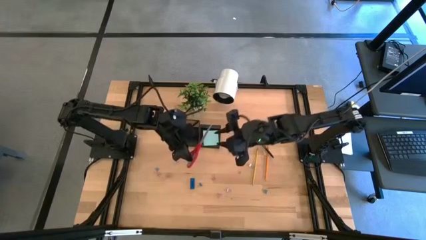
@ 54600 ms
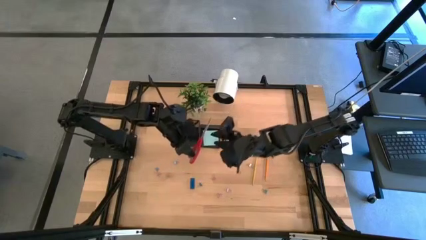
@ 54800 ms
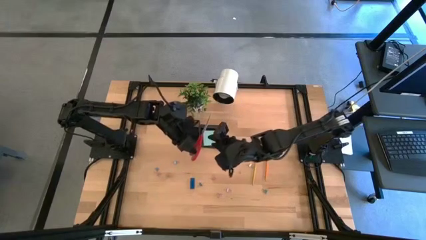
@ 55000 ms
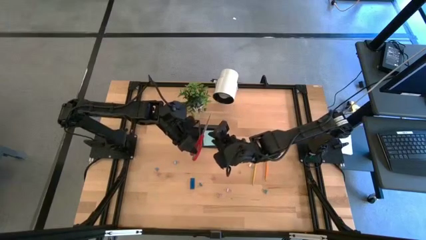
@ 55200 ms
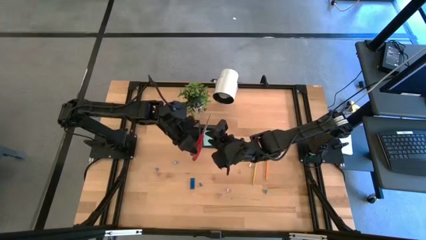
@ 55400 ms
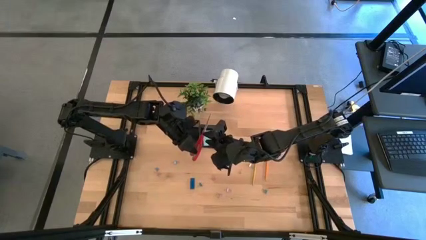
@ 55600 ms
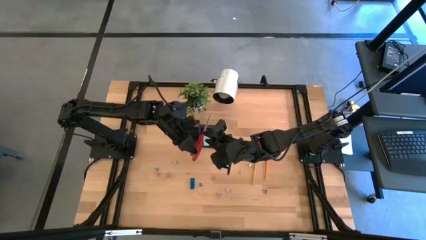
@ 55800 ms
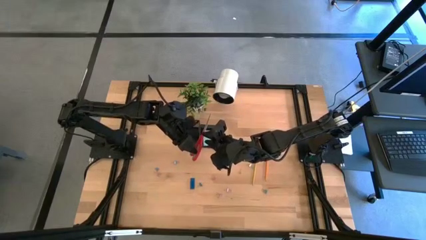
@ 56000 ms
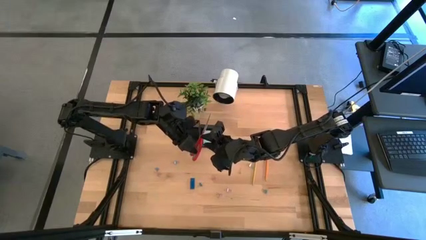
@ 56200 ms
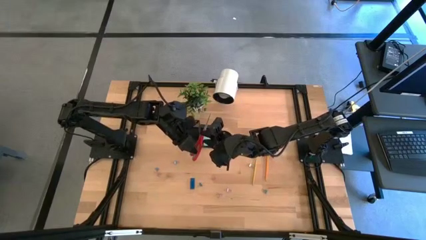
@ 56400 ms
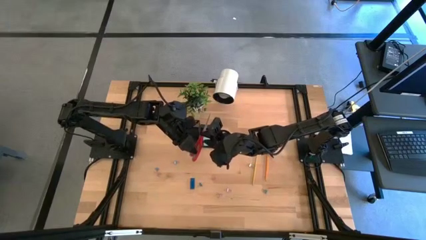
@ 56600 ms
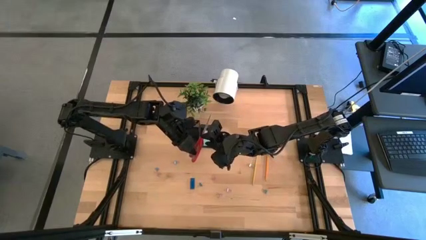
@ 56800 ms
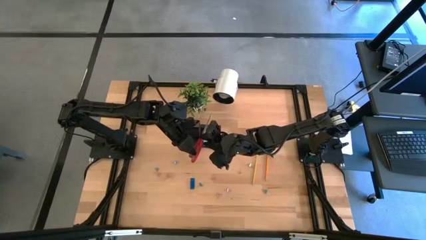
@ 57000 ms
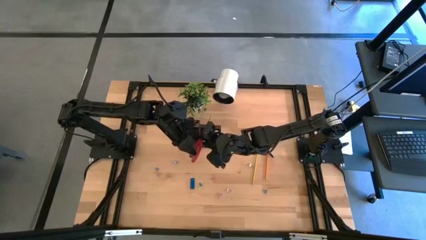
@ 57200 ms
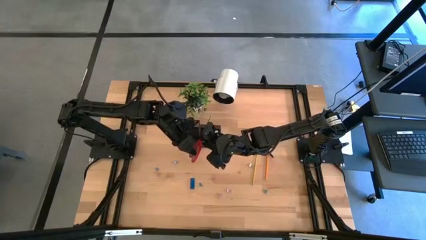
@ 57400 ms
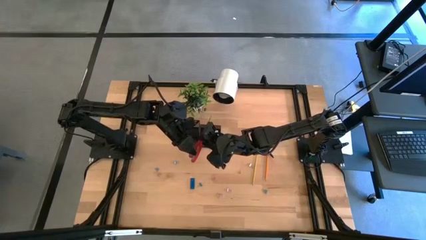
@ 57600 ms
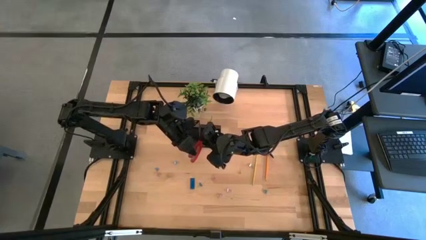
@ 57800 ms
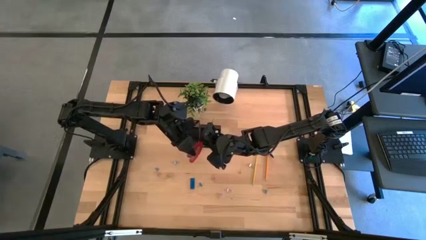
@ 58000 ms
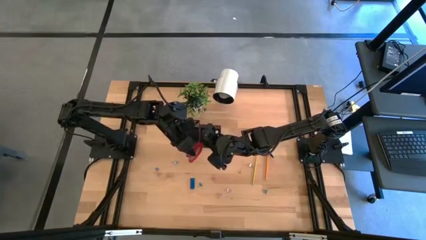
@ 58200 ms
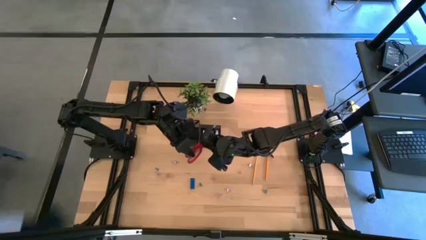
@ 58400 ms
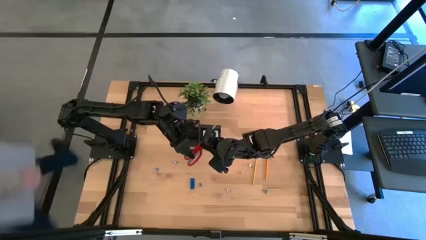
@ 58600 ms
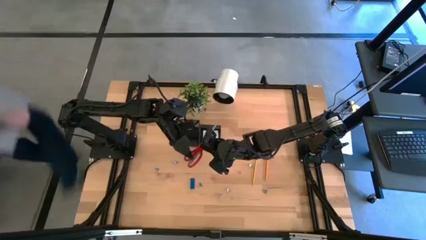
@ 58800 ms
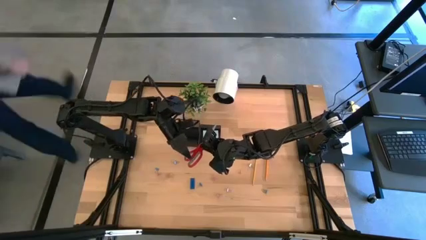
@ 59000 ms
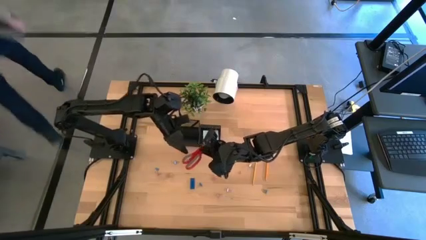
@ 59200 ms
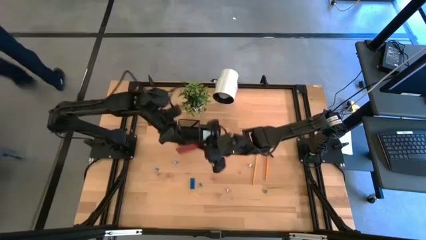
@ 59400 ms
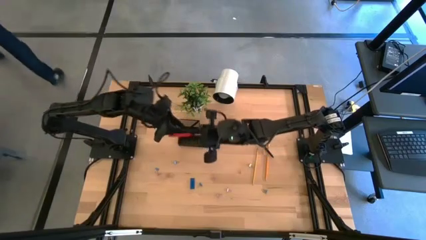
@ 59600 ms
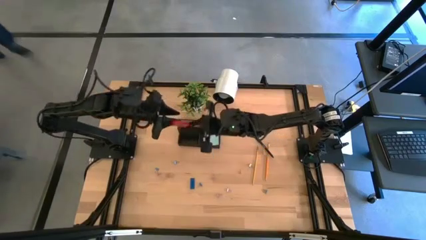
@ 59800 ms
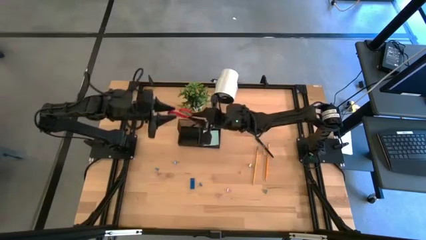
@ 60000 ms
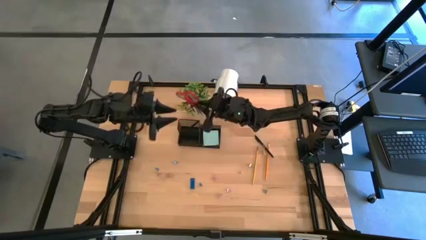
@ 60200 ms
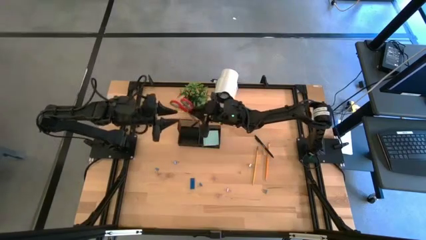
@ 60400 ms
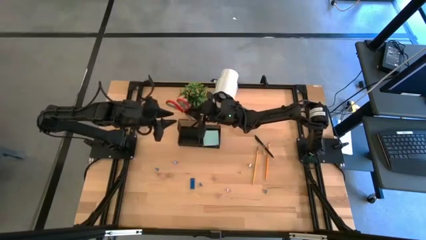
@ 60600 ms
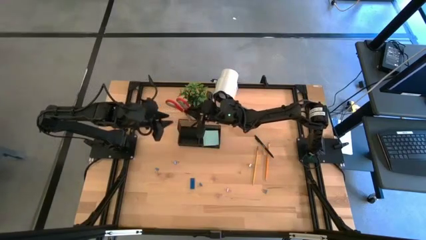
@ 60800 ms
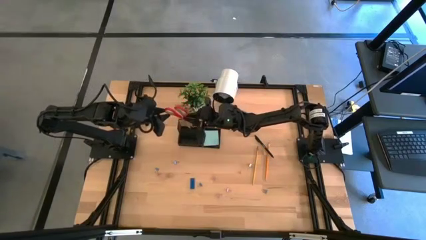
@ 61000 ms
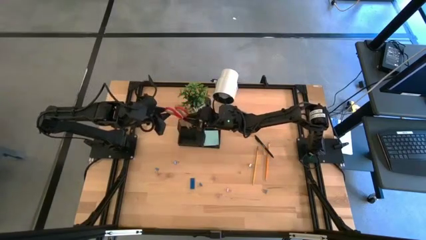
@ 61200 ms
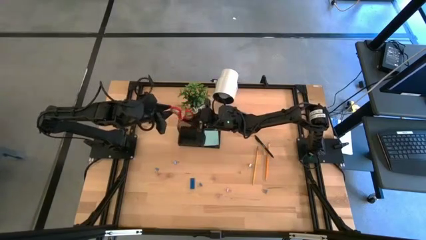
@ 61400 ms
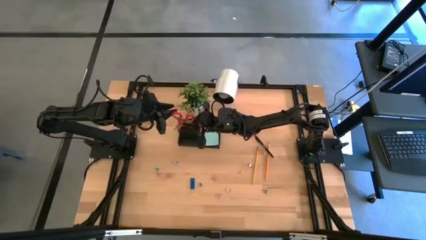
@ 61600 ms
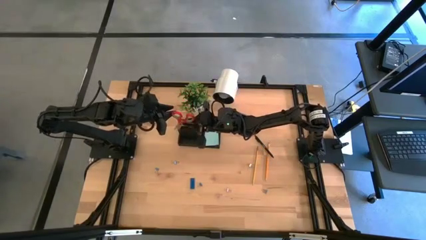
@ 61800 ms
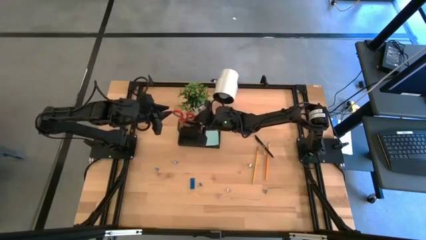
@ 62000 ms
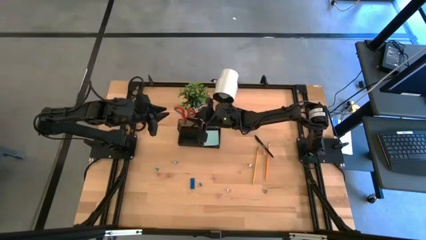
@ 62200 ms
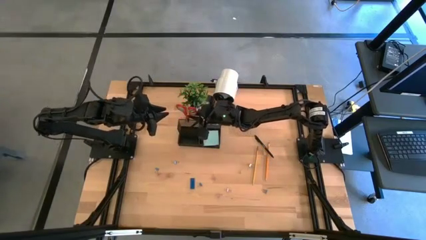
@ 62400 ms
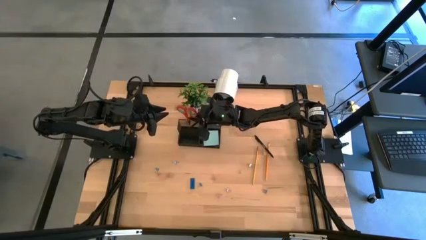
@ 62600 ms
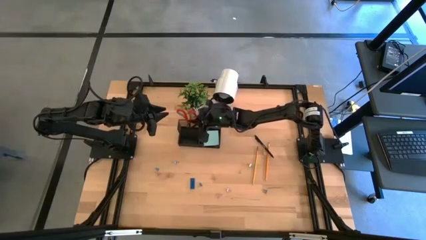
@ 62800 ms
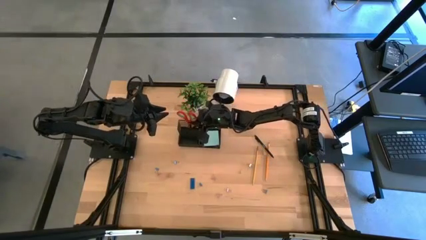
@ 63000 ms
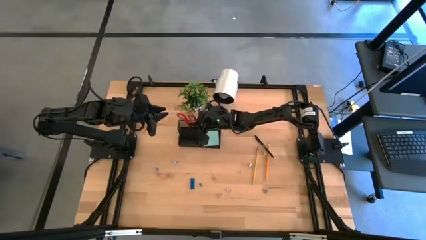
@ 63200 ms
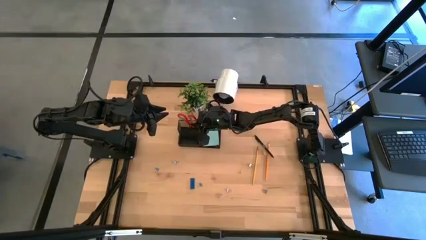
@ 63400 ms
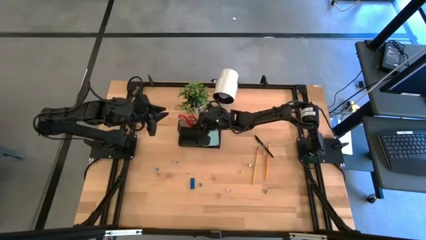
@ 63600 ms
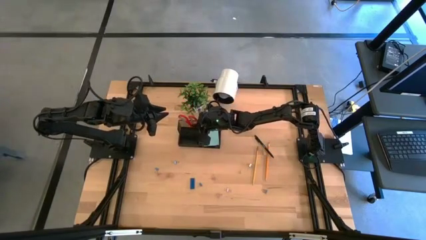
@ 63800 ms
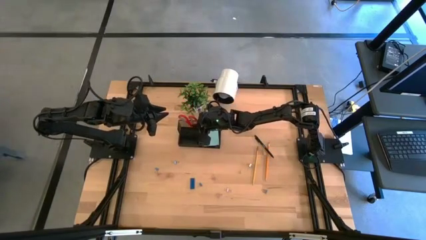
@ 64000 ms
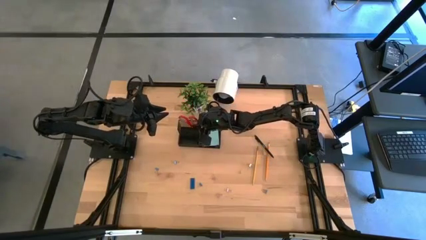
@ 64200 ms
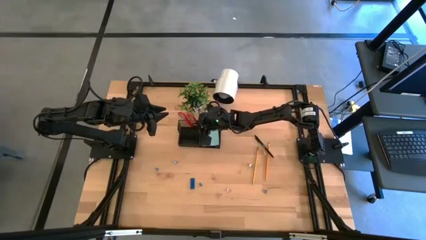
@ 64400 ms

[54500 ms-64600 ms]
Task: Pick and place office supplies into organizer
Put the red scissors into the black desk organizer

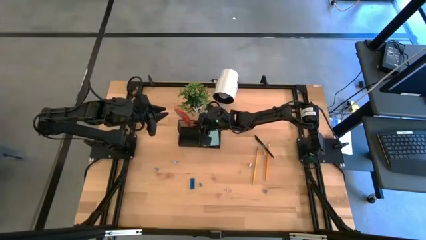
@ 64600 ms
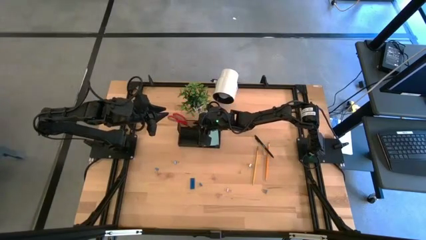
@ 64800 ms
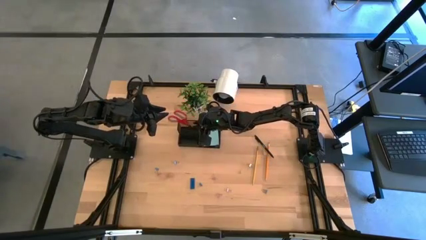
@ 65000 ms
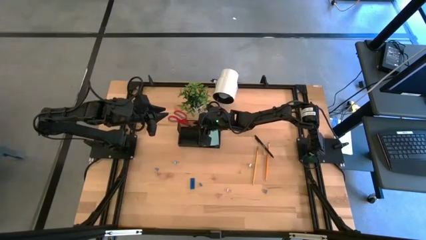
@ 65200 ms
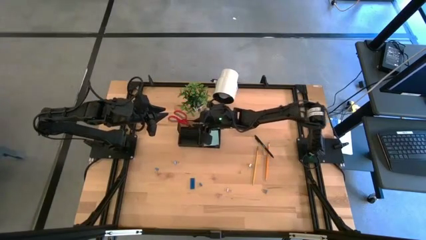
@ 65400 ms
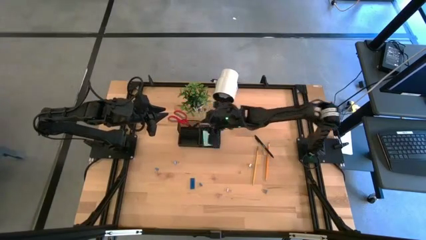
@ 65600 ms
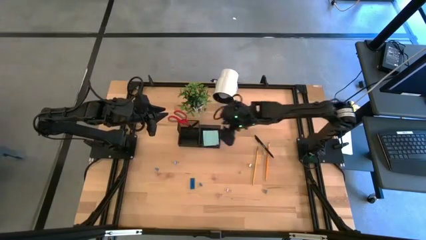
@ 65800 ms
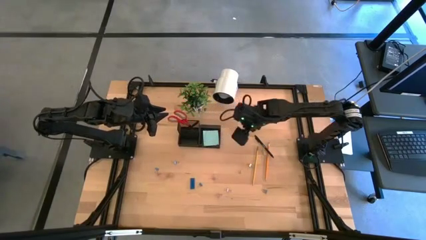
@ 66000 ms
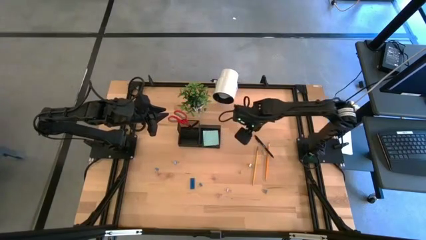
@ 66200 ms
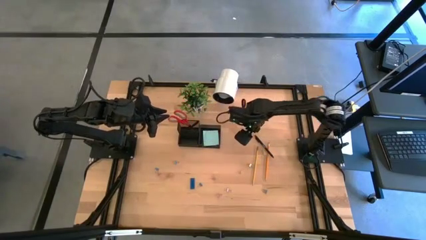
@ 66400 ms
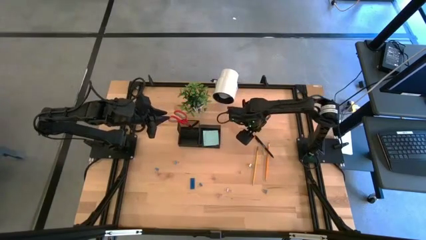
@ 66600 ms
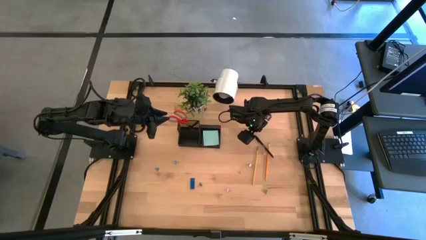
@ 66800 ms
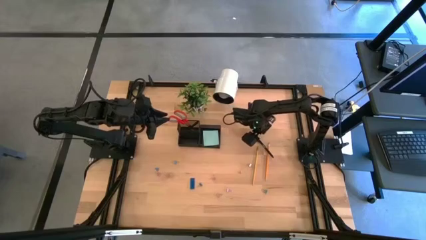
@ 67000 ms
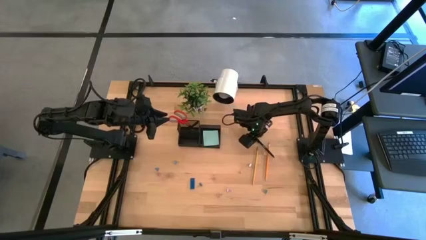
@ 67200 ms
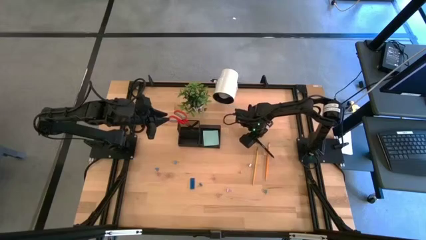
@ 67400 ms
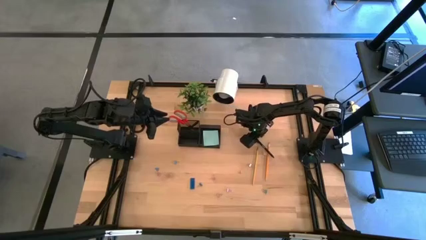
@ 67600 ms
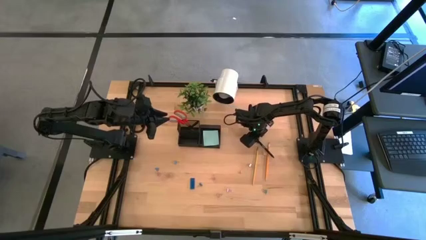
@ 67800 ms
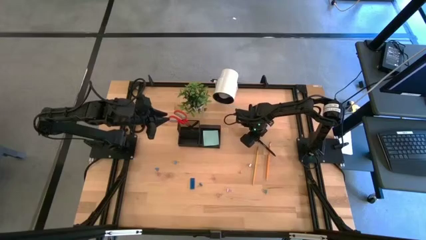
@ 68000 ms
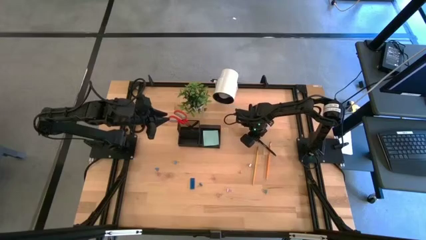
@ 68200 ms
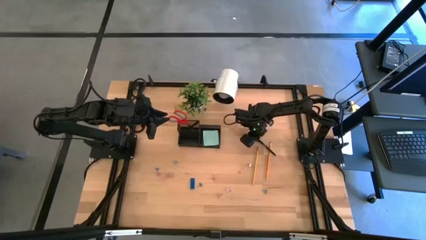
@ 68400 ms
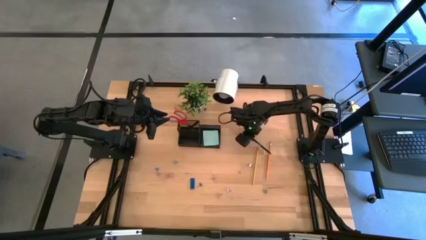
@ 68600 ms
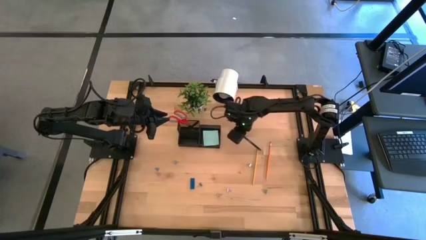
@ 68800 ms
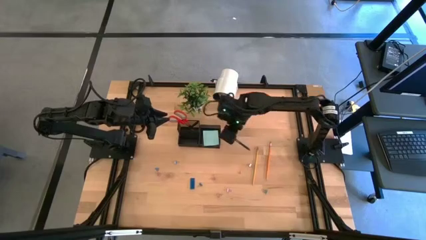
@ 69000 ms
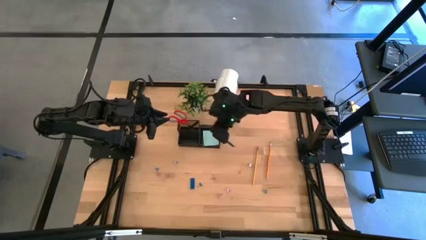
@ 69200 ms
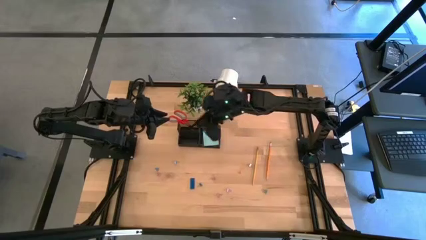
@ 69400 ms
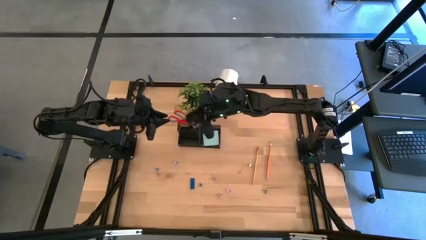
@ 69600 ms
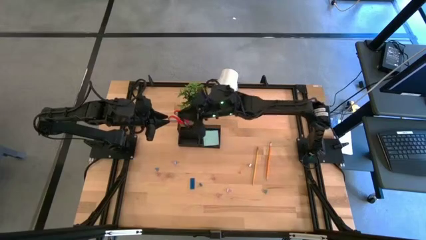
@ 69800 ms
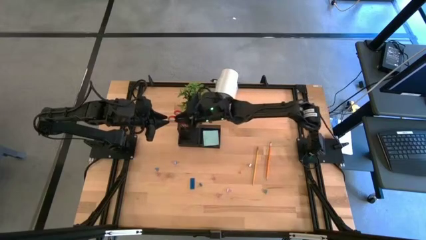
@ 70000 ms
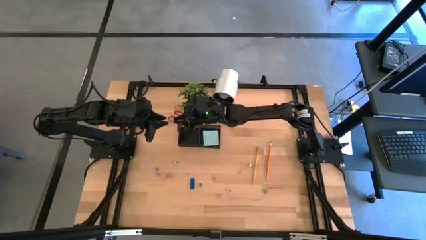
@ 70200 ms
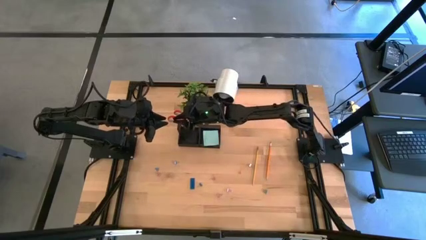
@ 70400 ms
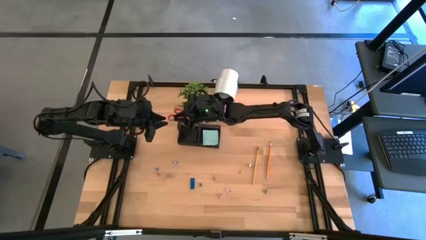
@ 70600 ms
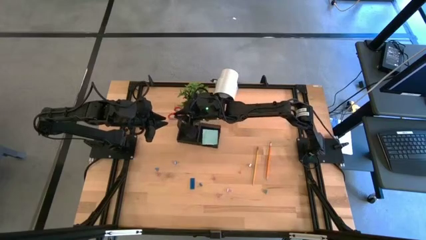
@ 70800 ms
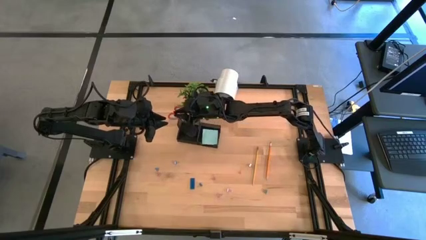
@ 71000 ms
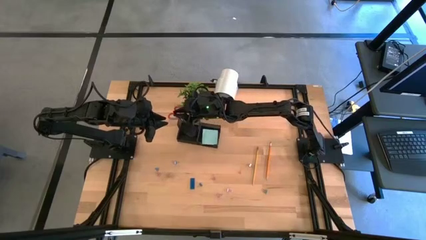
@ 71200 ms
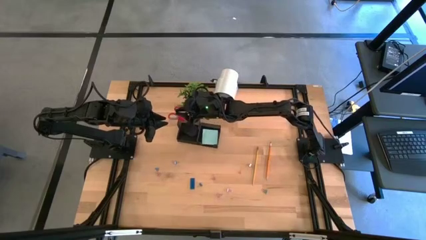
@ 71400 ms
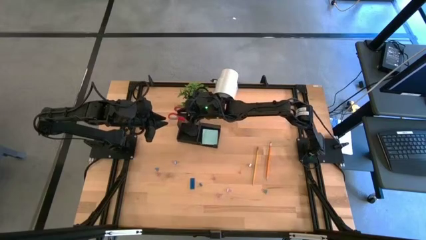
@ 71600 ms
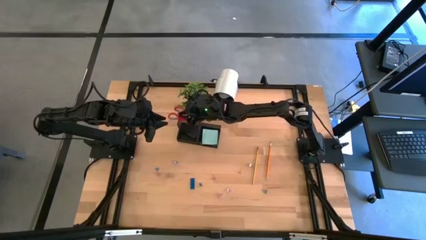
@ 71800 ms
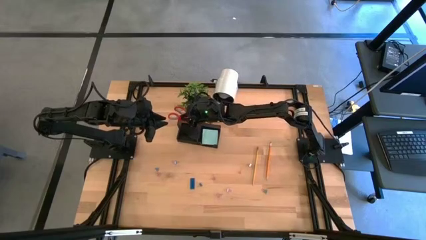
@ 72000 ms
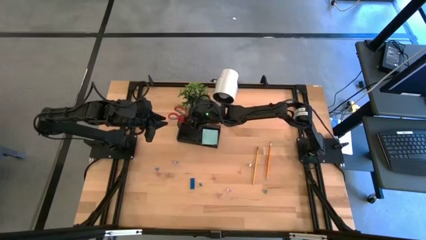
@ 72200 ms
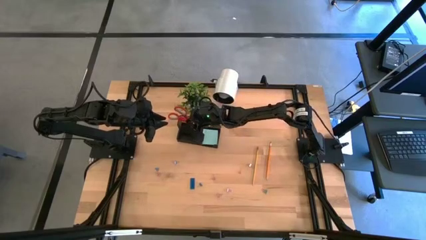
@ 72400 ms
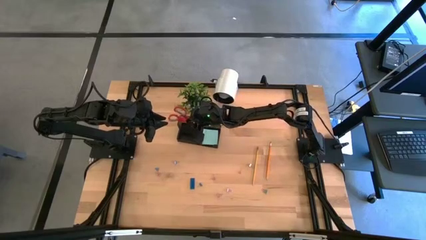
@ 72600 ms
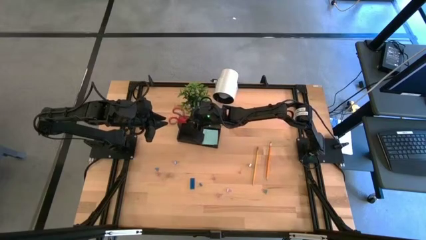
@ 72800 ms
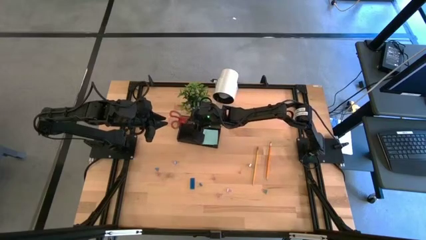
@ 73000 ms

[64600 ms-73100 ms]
Put the black pen into the black desk organizer
